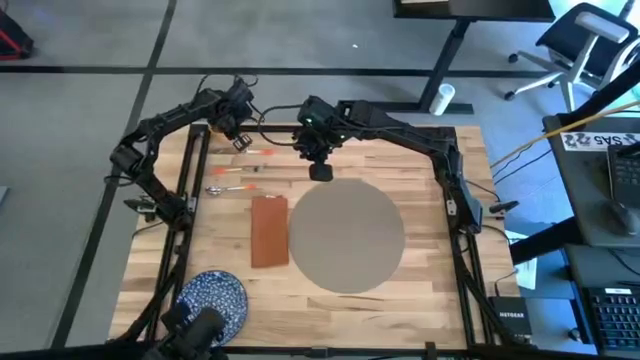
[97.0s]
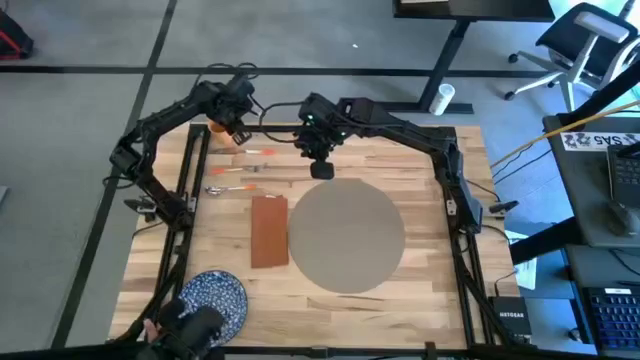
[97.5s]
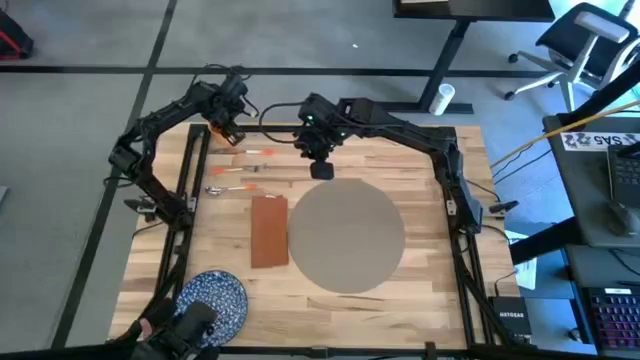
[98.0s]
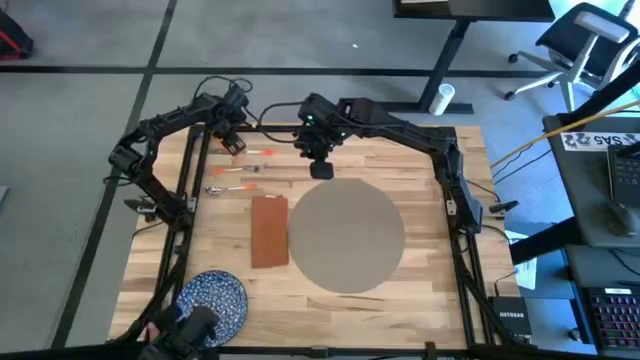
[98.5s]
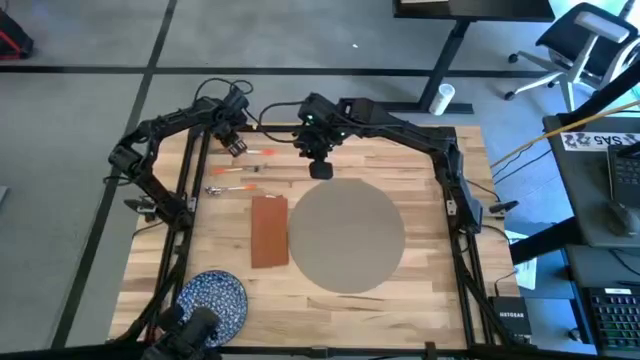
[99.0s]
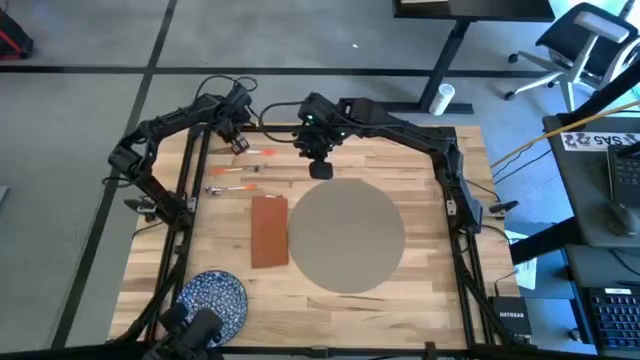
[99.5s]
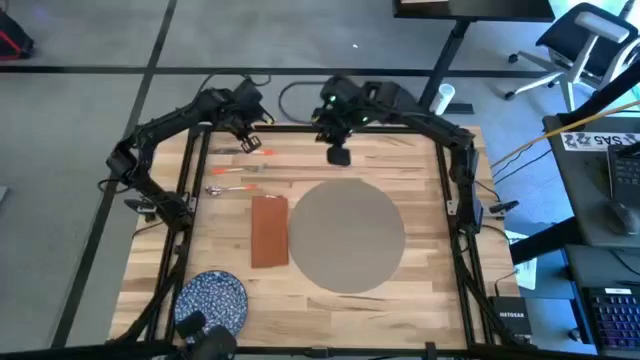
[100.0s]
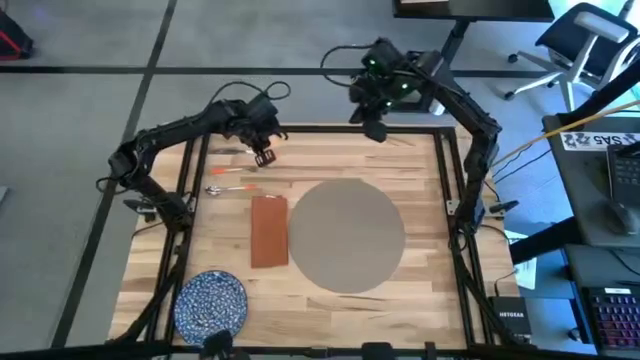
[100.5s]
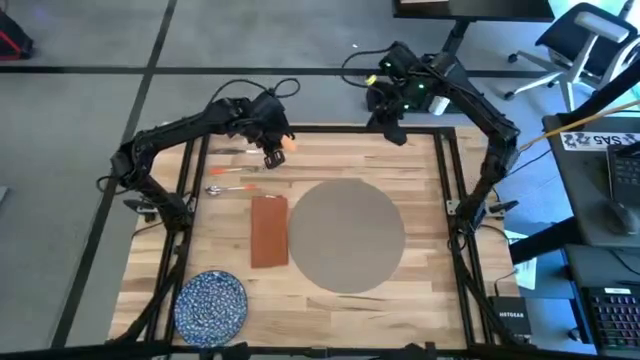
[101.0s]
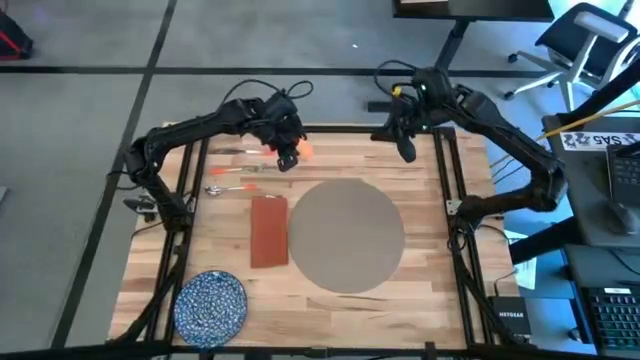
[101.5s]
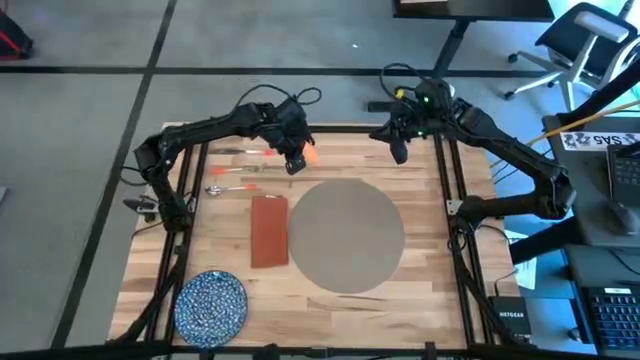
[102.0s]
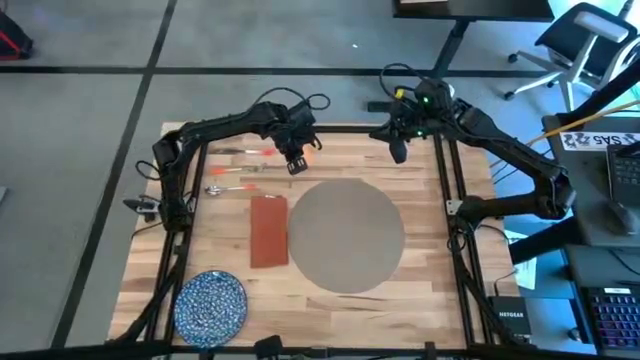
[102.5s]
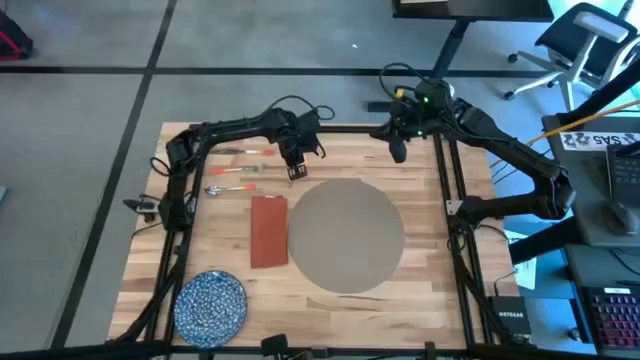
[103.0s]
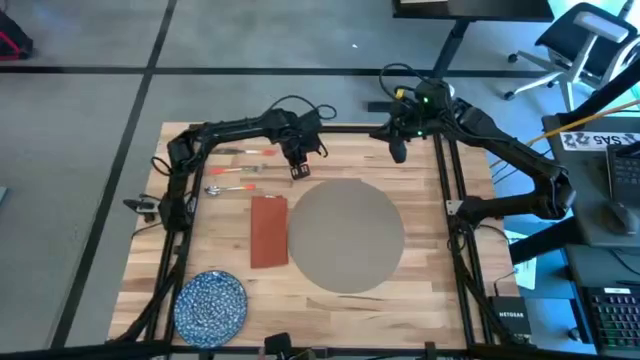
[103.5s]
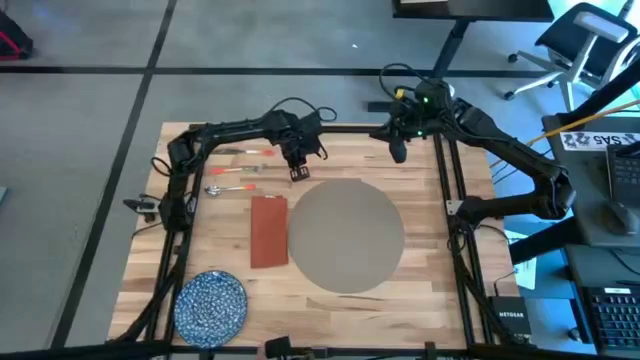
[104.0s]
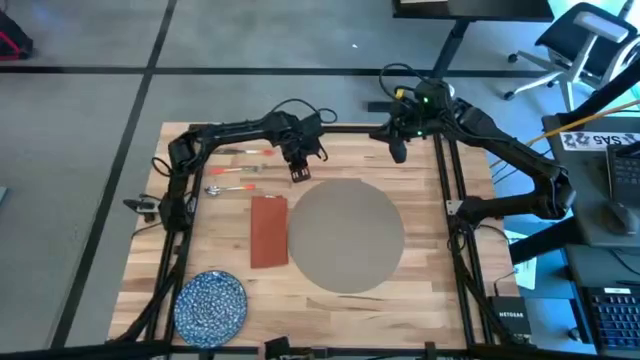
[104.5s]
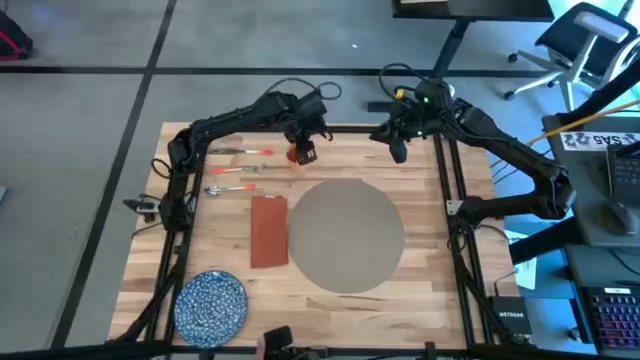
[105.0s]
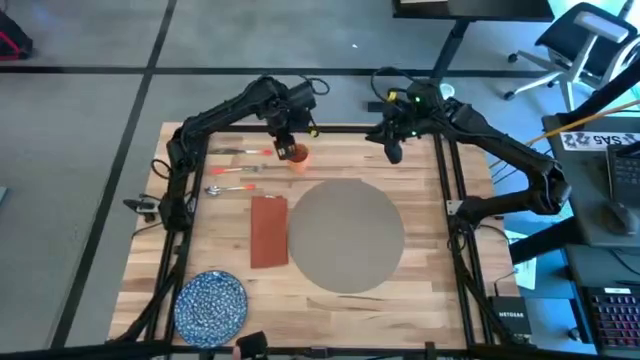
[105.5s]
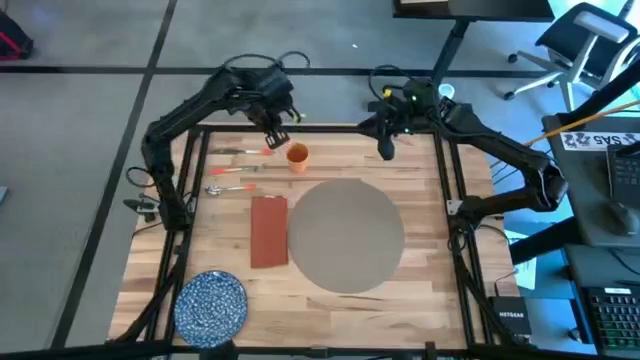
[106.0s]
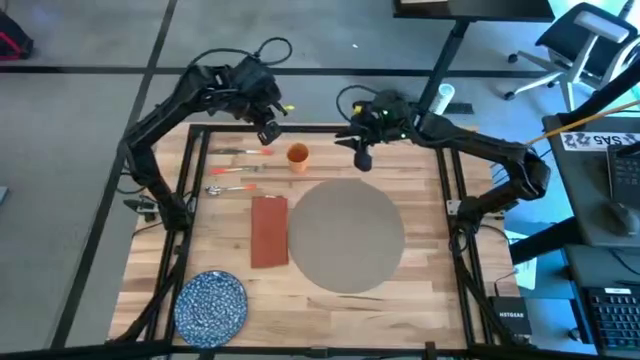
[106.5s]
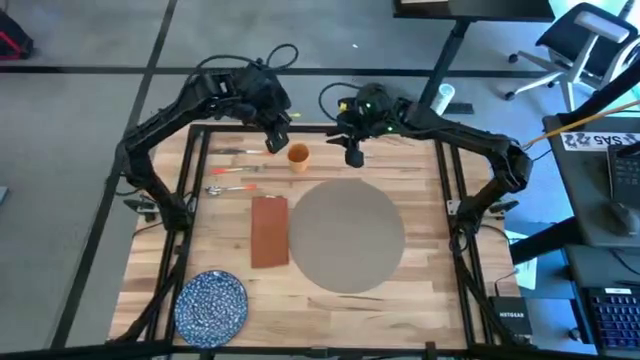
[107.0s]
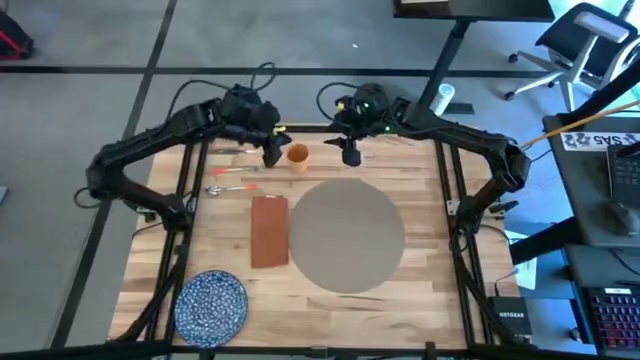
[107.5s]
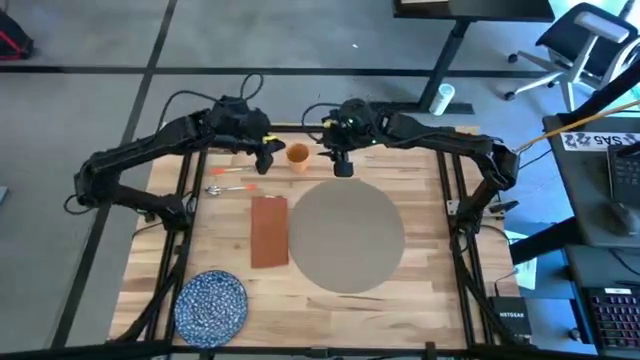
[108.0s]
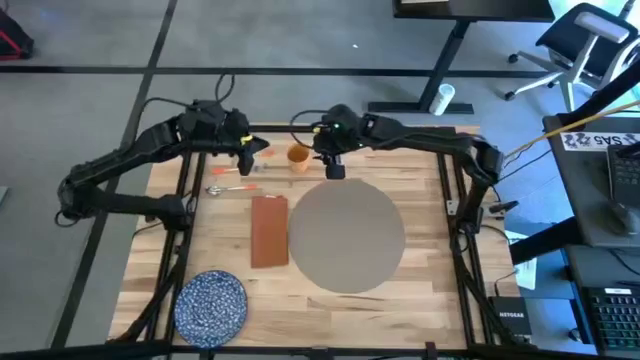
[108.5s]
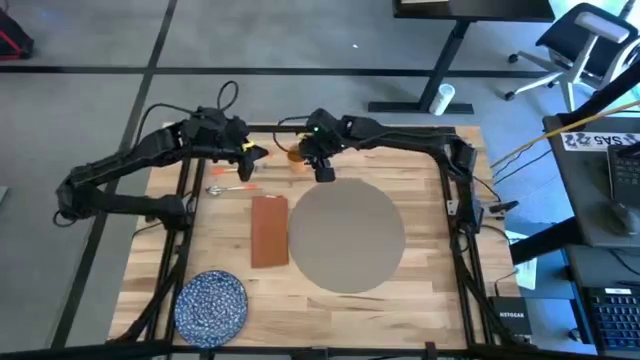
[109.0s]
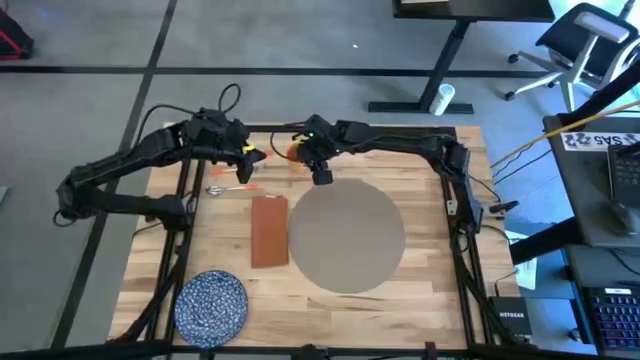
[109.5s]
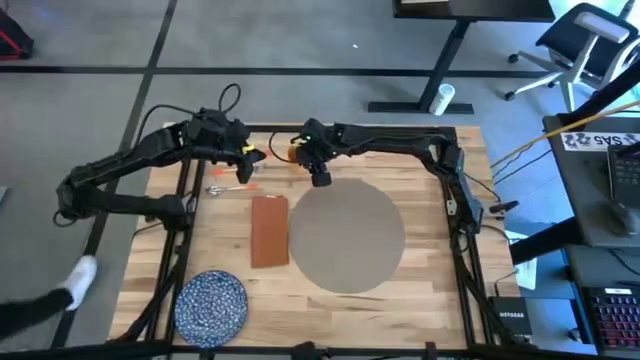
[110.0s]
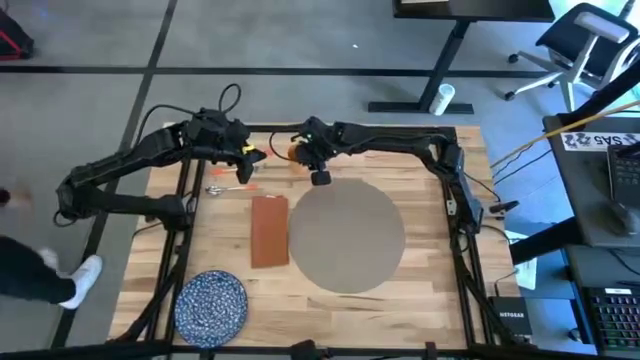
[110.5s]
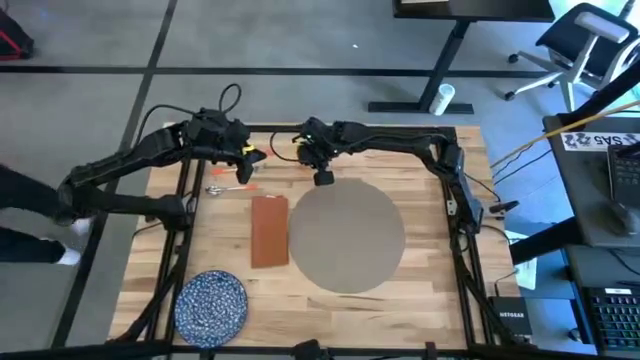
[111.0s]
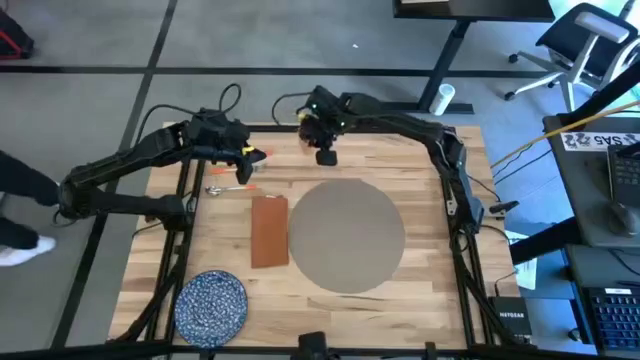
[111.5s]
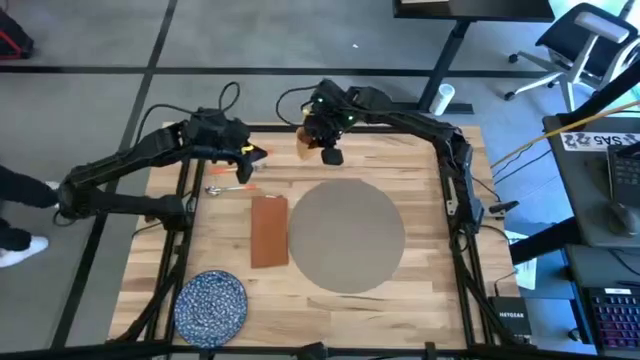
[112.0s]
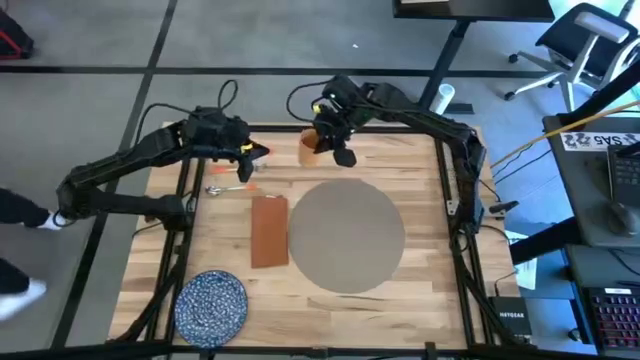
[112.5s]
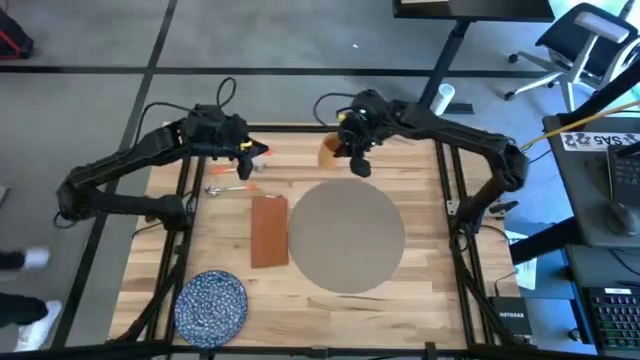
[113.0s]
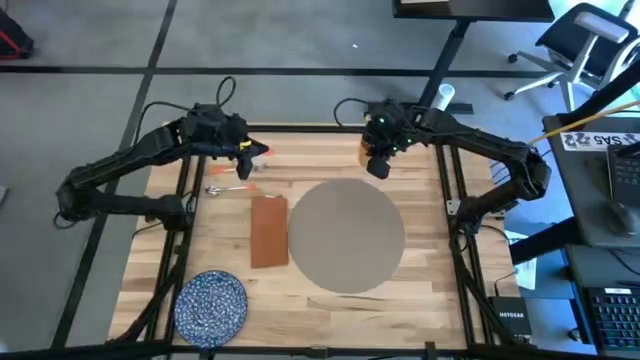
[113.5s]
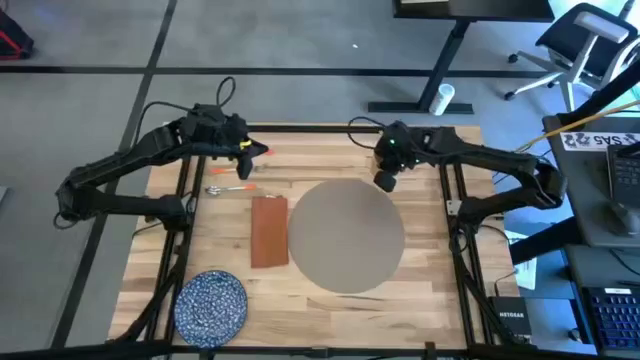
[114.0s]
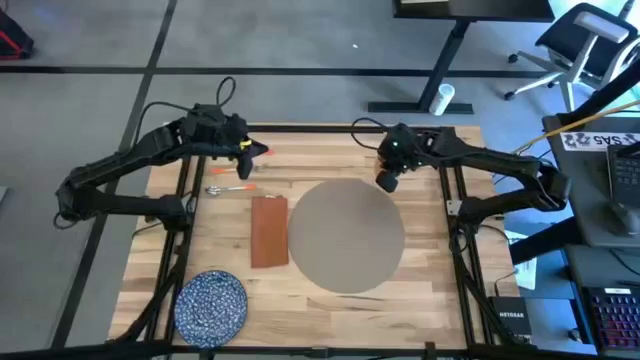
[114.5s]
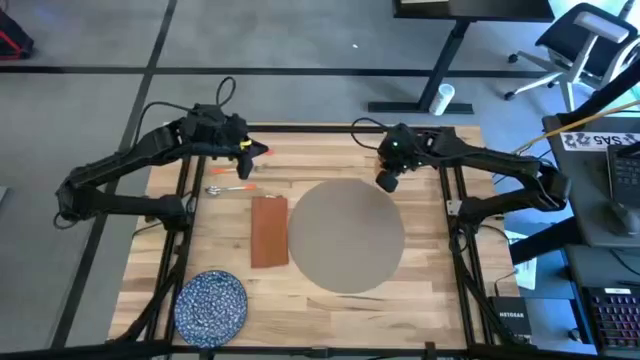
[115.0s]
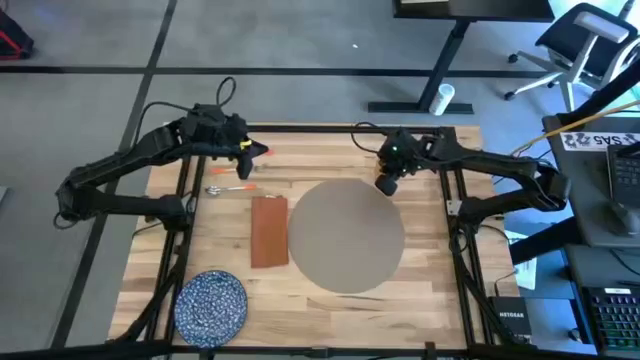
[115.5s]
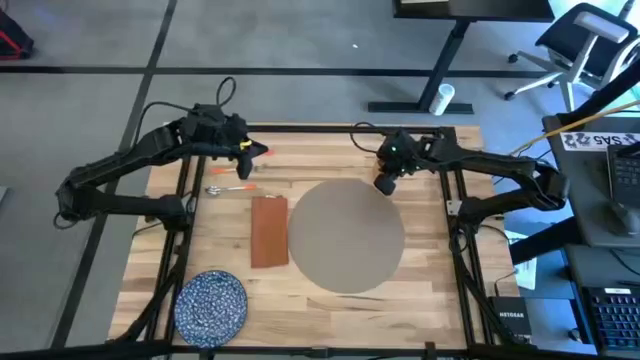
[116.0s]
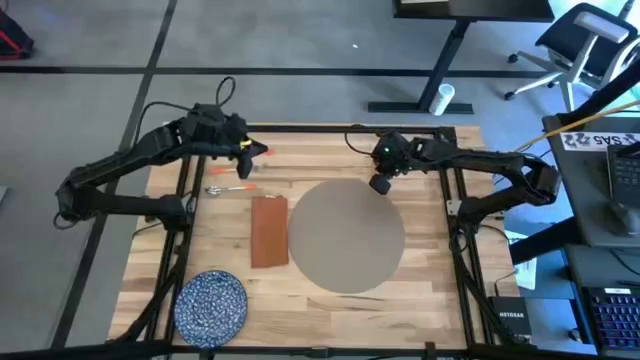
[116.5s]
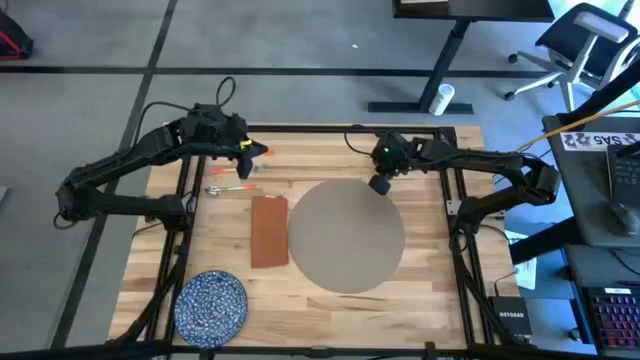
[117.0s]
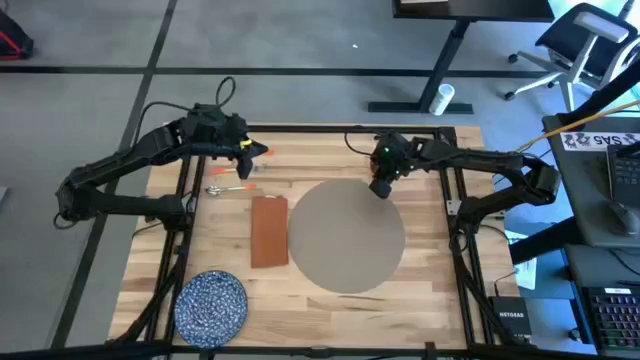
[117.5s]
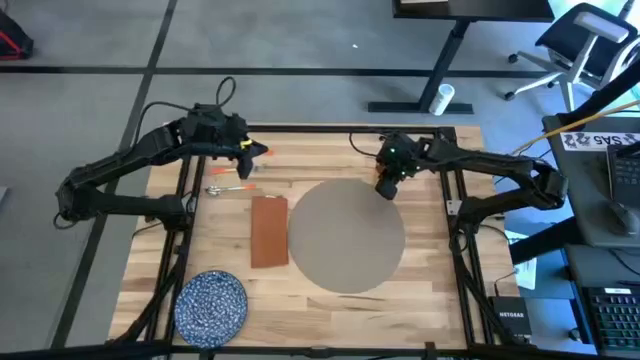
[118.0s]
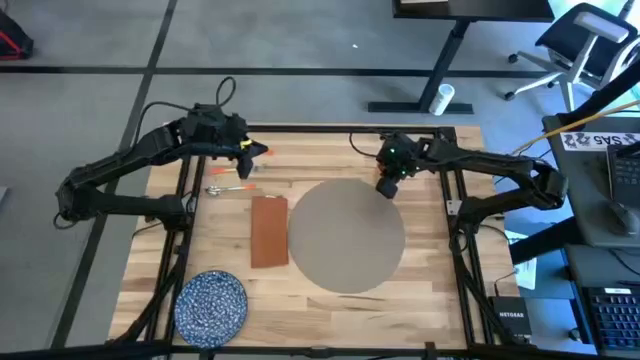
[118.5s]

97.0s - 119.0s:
Task: Set table place
Move the yellow cup to the top right of the table
